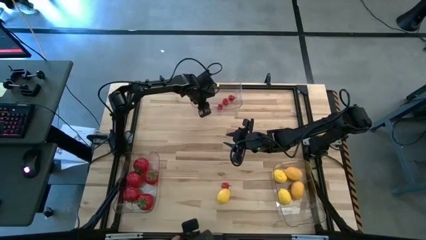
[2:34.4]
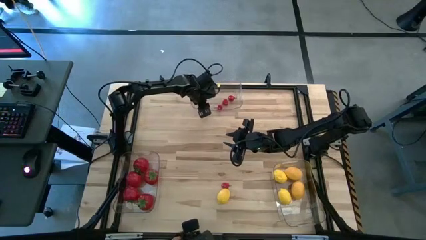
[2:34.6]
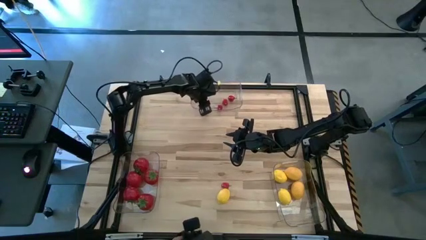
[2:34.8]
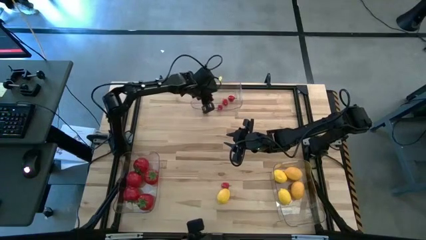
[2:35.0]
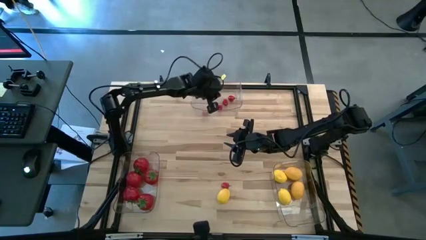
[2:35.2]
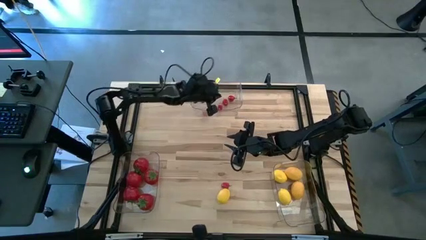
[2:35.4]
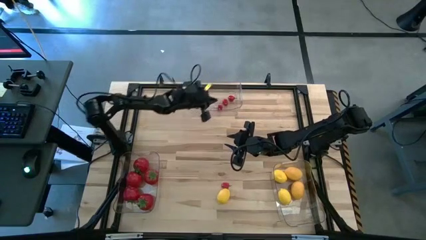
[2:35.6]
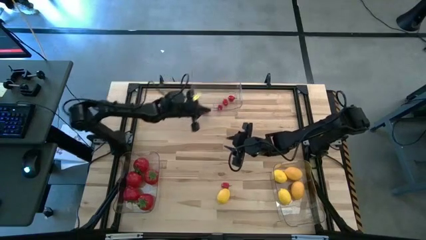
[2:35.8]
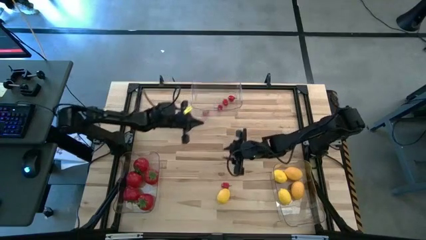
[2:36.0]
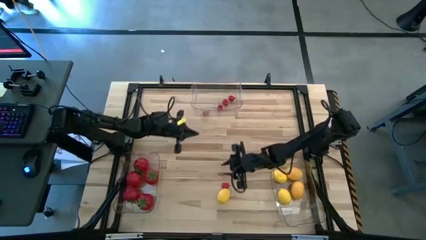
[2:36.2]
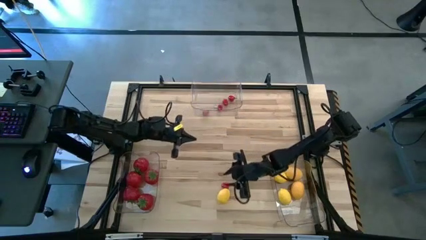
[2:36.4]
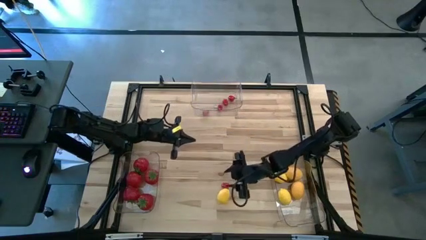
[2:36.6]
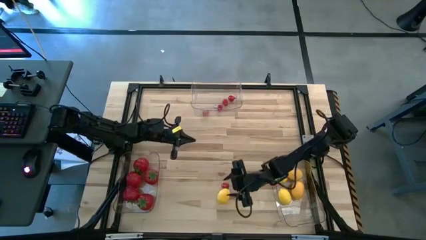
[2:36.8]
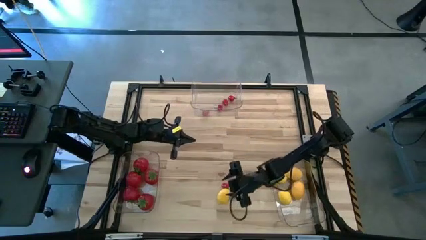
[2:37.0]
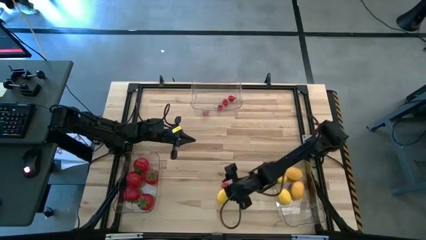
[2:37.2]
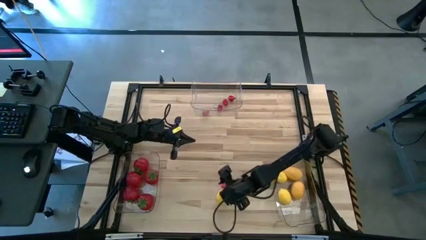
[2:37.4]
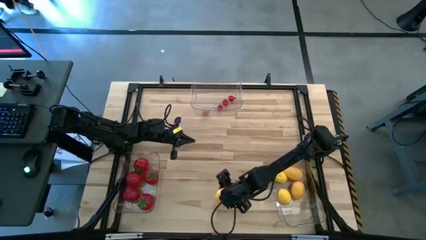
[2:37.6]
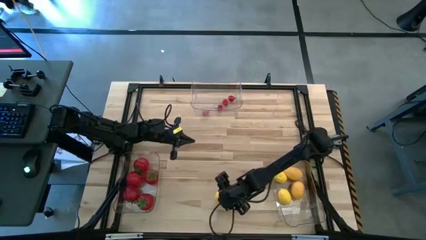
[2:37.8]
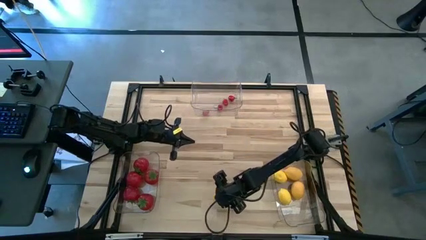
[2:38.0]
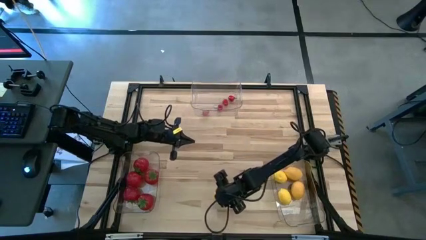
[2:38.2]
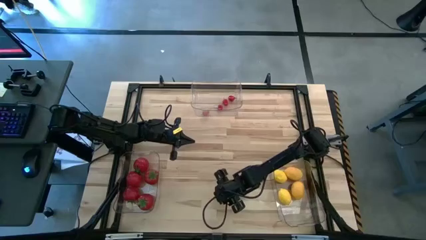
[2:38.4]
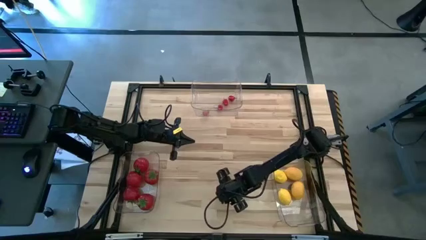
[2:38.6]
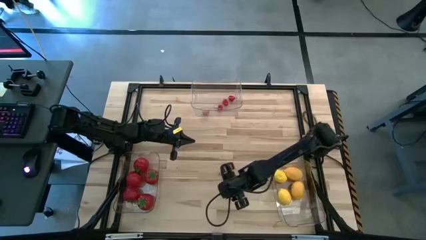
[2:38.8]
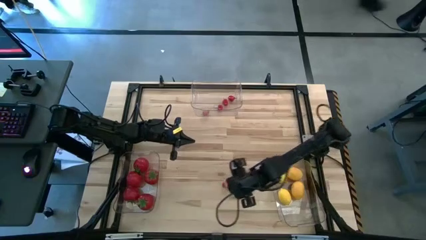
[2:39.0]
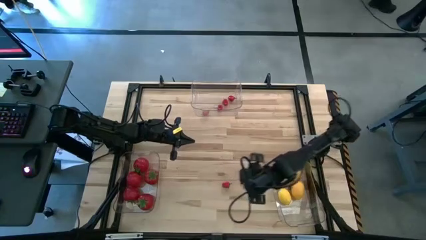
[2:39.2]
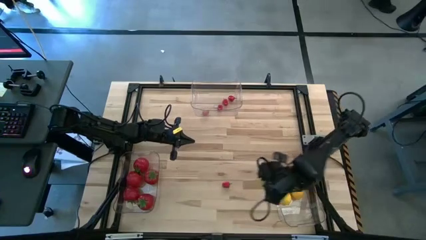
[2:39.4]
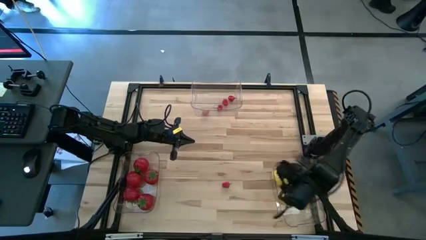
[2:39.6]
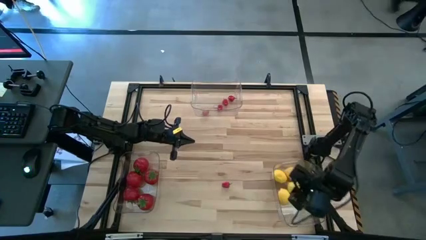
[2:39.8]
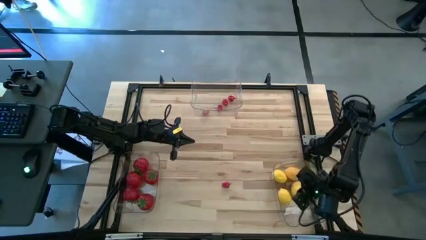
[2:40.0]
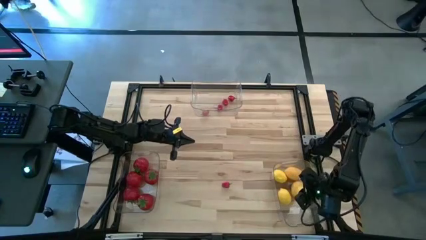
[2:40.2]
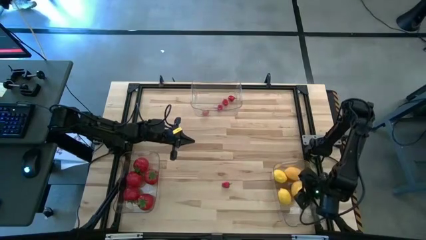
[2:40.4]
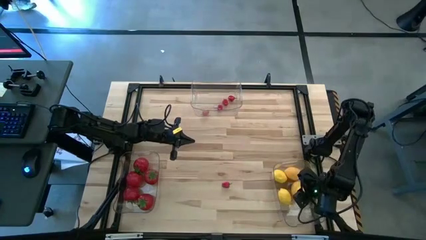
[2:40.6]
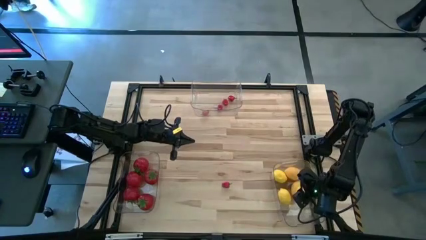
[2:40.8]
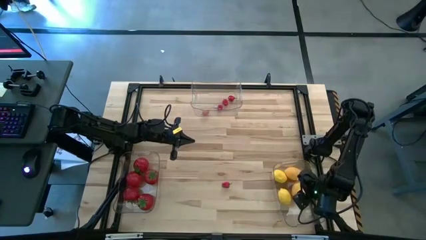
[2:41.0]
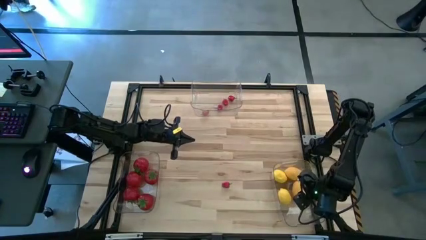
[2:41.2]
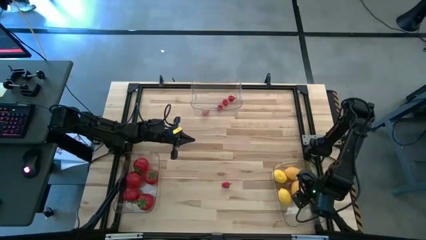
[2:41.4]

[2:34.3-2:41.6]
Task: Sort produce into baskets
Put the yellow lemon into the bottom right transparent bin

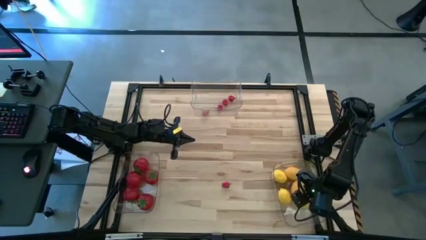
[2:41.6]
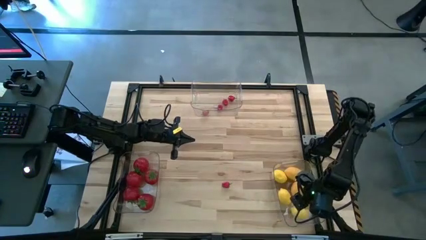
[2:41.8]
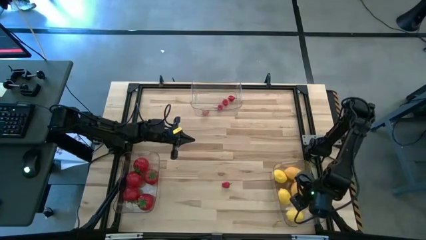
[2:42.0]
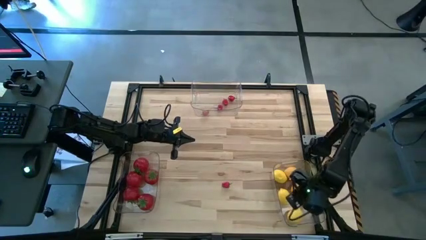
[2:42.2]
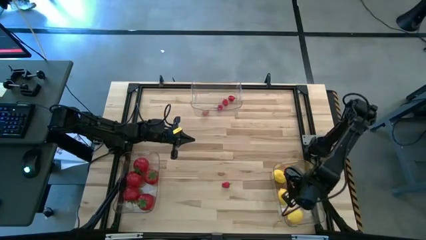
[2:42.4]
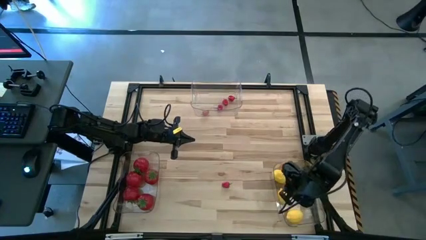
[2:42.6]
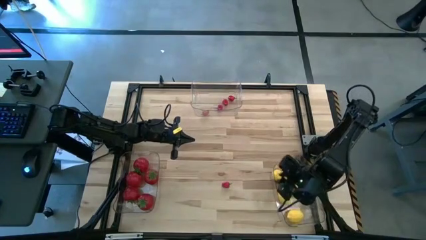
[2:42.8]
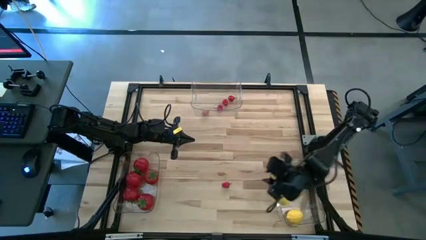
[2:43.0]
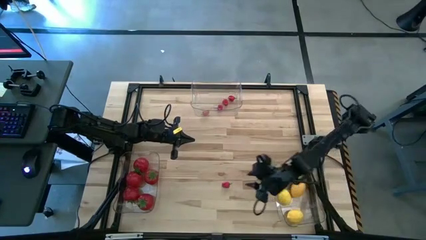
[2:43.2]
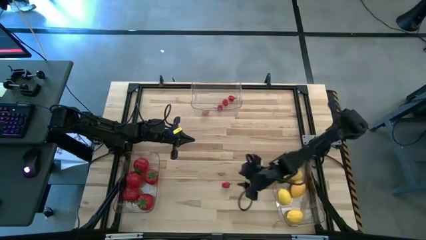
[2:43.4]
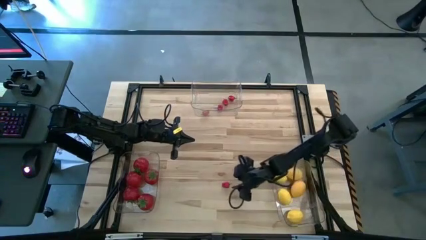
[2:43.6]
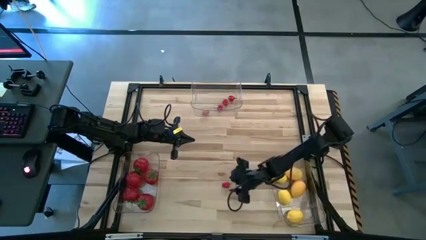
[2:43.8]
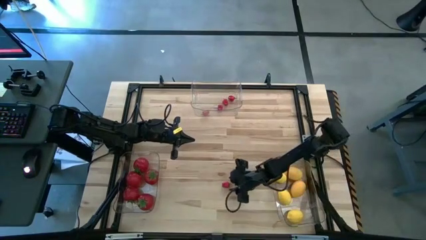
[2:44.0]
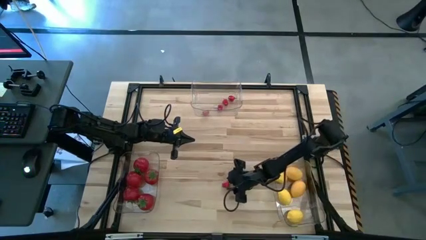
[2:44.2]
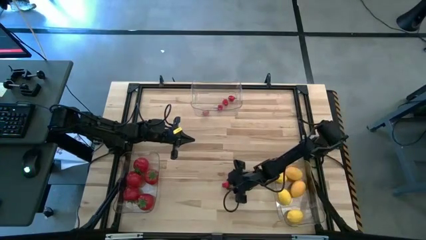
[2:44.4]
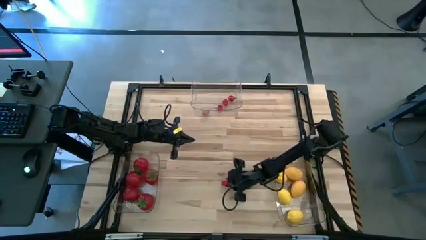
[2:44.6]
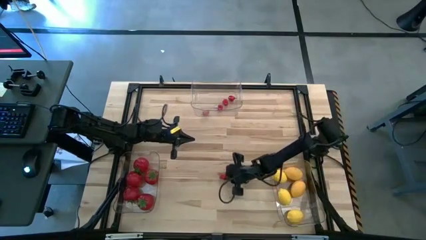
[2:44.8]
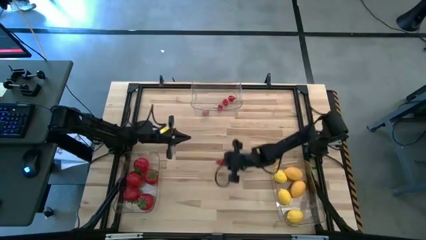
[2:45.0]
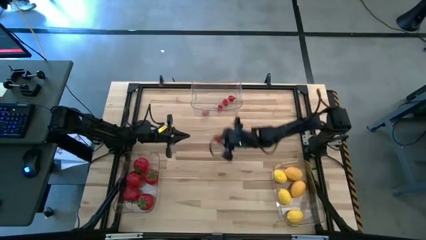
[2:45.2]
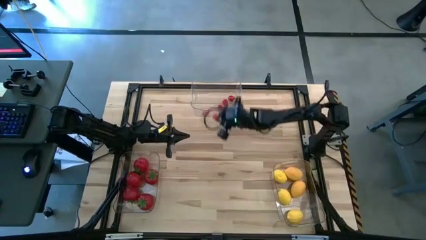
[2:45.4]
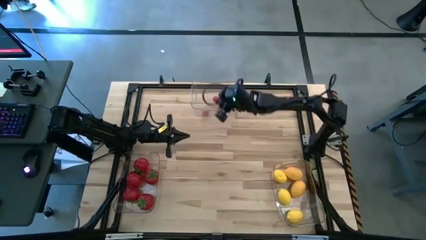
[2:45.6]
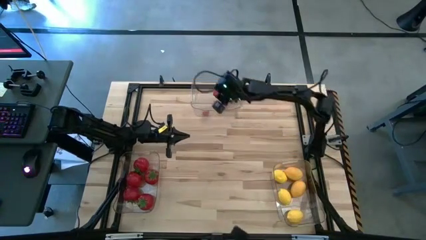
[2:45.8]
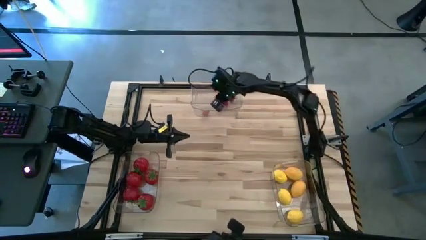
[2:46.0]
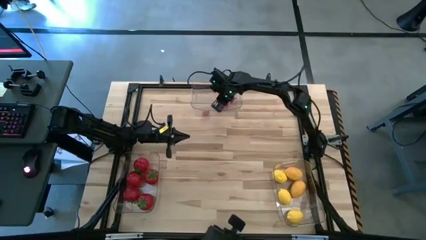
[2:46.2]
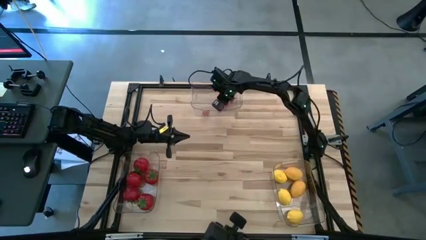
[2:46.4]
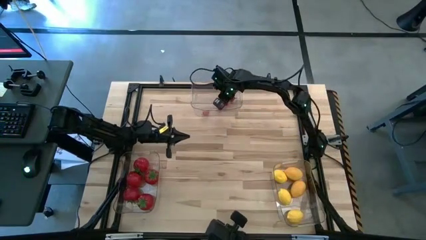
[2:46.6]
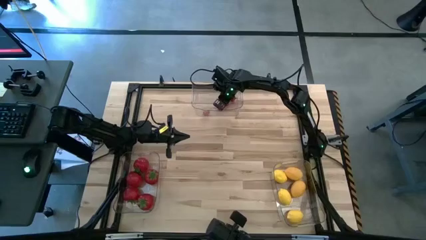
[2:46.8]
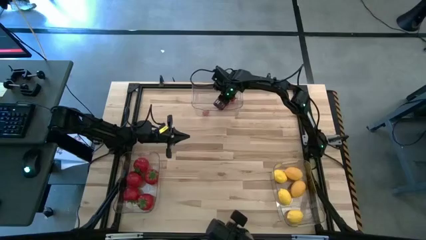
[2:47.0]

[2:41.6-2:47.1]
Put the red chili pepper into the top center transparent bin

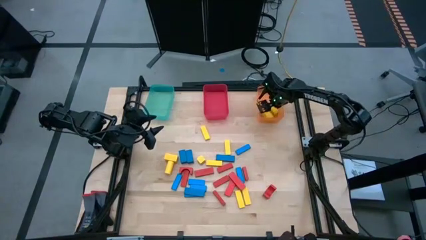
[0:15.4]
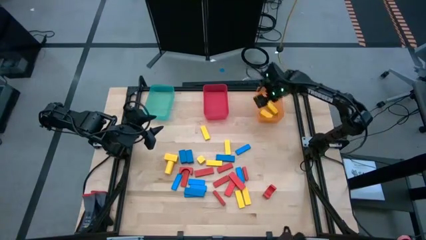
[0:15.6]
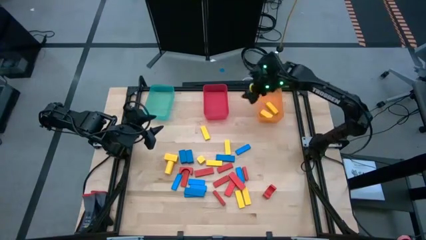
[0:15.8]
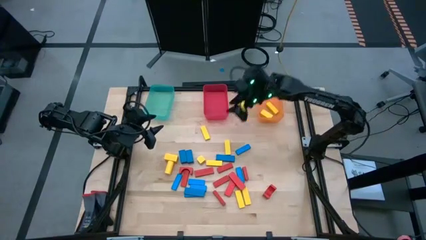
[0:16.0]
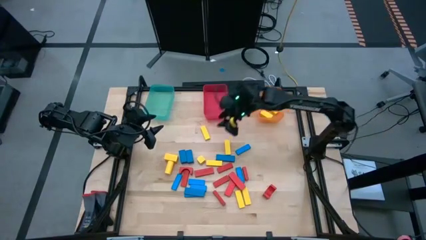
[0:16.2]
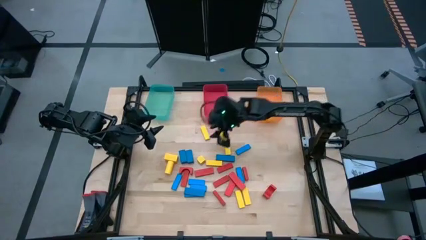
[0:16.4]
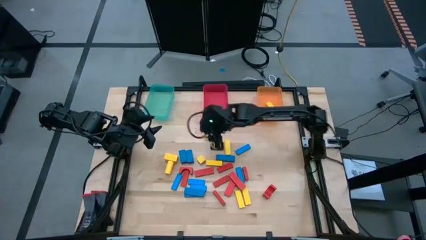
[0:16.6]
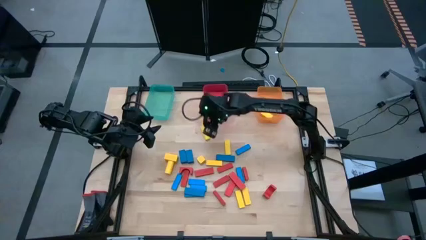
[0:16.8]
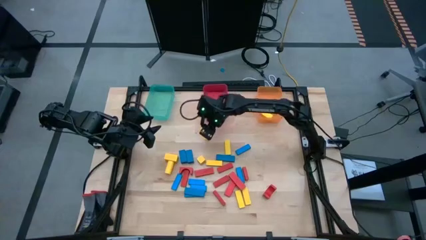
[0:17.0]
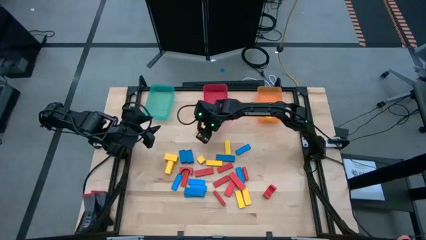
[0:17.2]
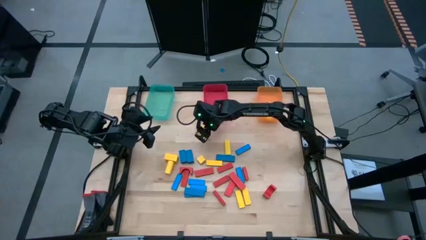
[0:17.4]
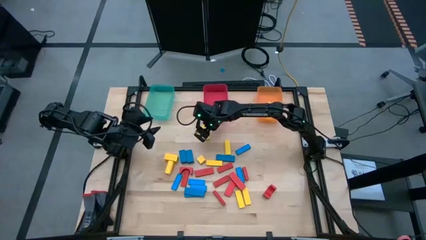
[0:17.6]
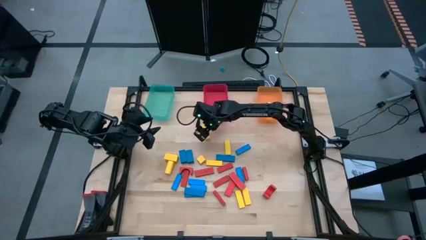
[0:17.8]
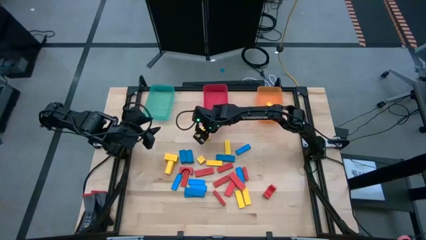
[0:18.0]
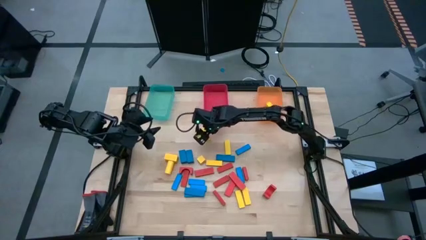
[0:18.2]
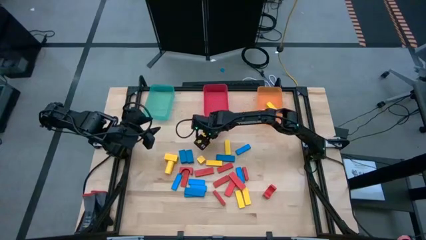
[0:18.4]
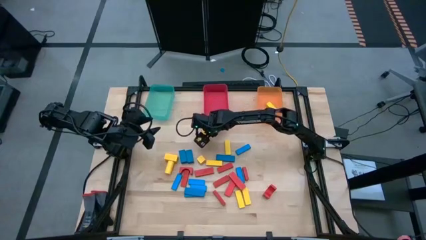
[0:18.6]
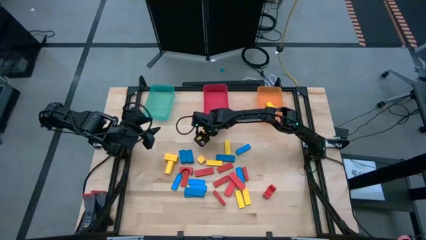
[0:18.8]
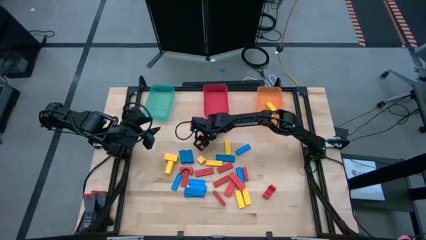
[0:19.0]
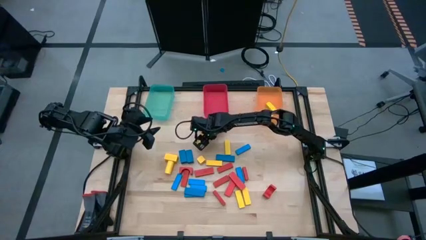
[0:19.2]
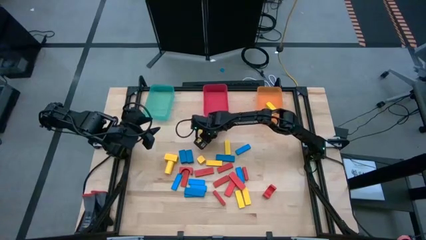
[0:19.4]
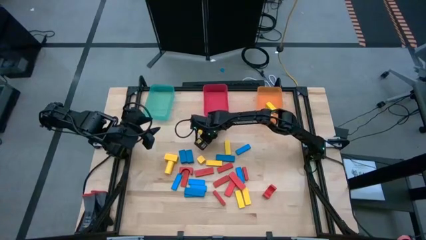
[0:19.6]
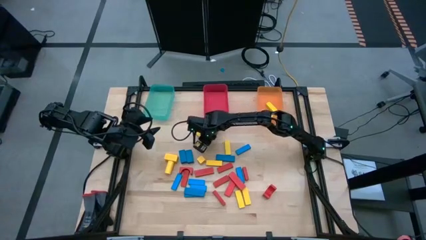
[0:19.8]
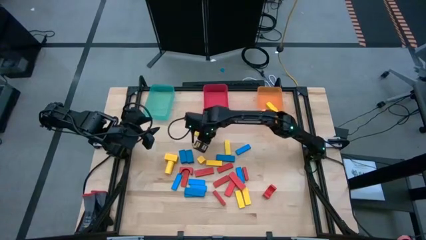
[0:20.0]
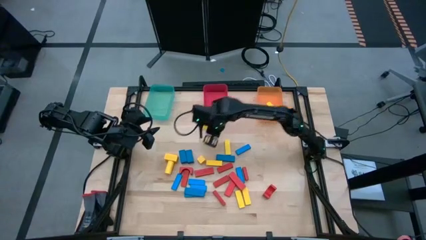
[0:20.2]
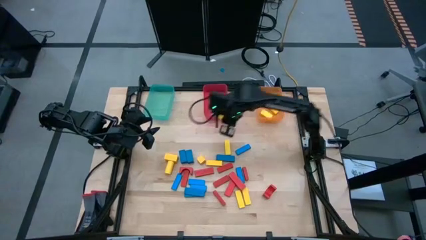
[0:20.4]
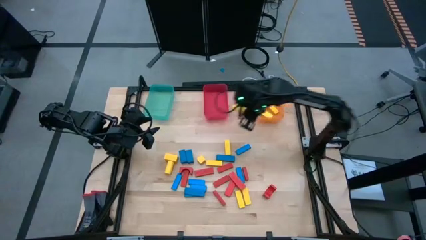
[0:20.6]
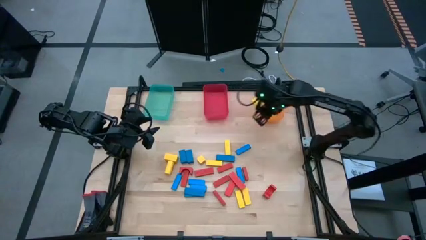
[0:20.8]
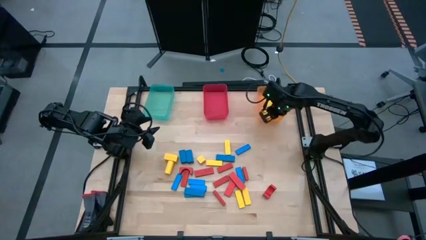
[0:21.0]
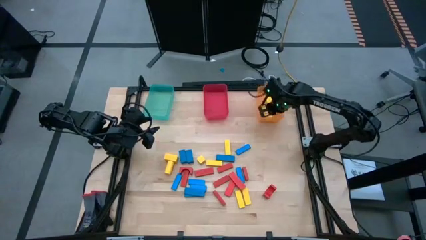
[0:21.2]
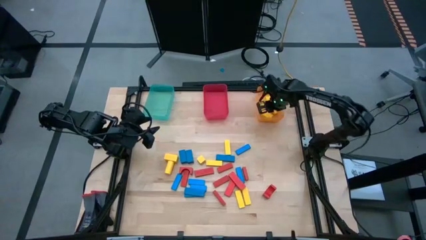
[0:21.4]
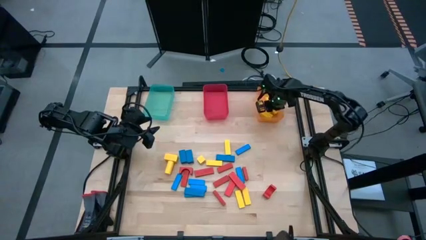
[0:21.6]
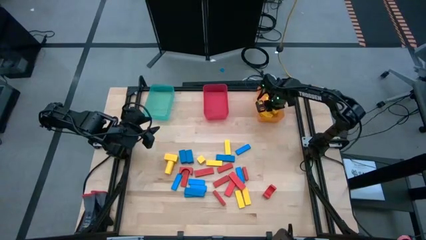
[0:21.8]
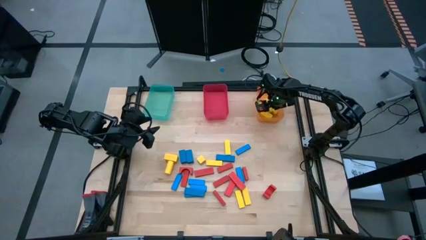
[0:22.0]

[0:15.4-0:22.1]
Task: Sort blocks
Put the yellow block into the orange bin
